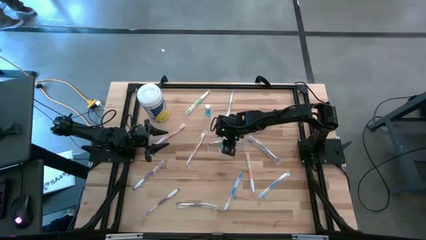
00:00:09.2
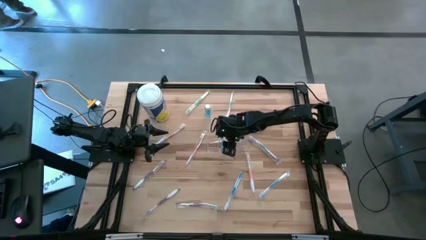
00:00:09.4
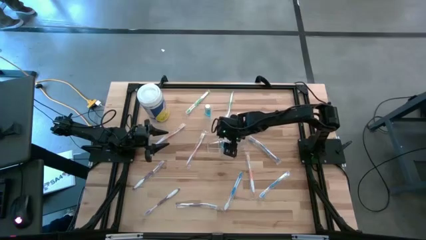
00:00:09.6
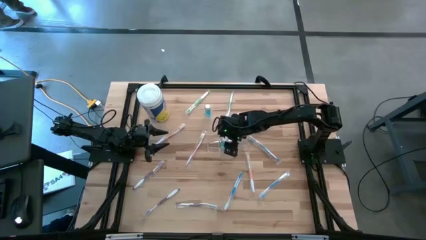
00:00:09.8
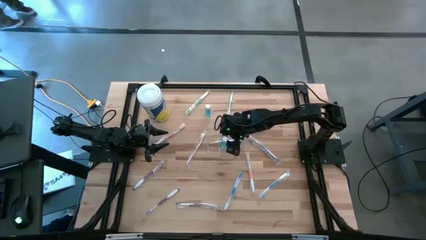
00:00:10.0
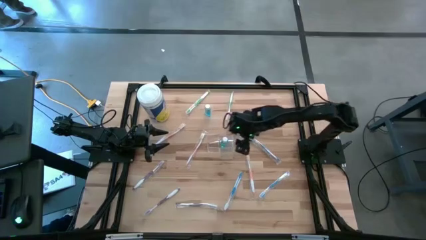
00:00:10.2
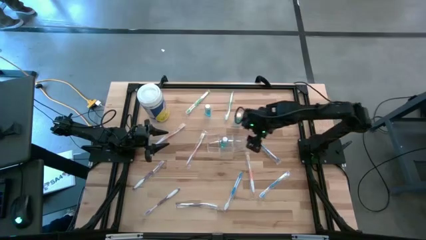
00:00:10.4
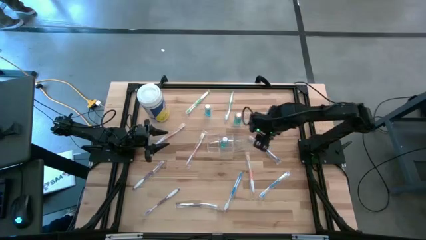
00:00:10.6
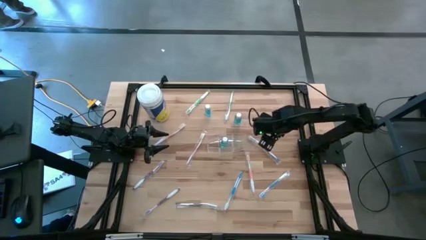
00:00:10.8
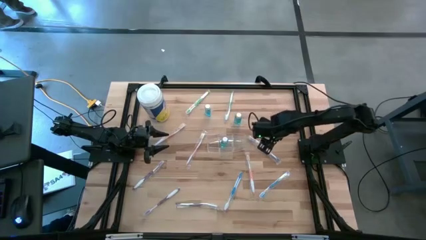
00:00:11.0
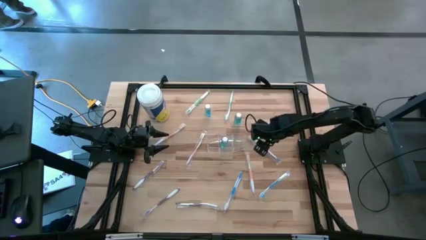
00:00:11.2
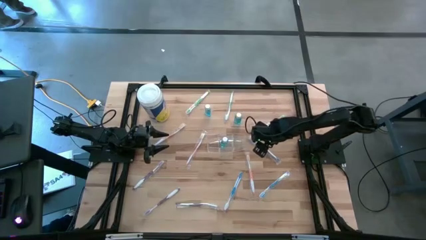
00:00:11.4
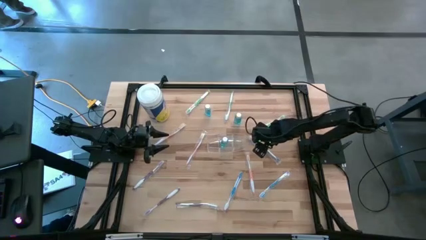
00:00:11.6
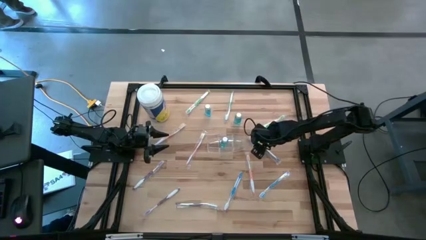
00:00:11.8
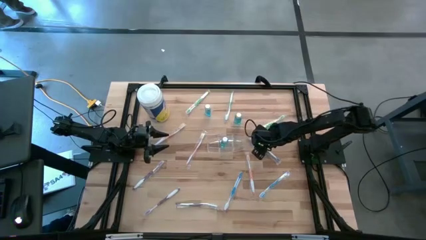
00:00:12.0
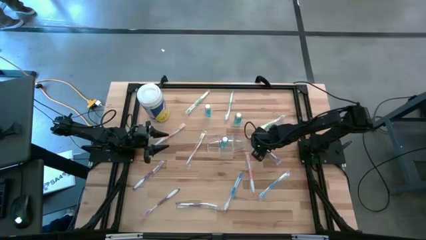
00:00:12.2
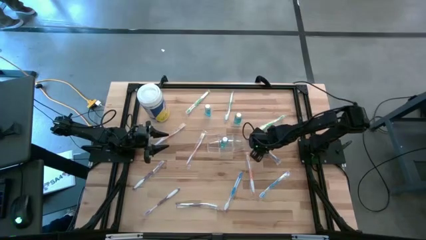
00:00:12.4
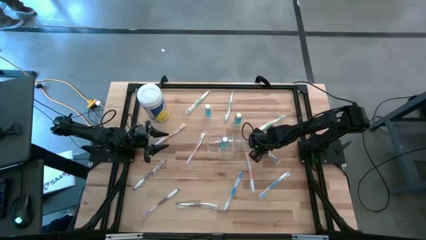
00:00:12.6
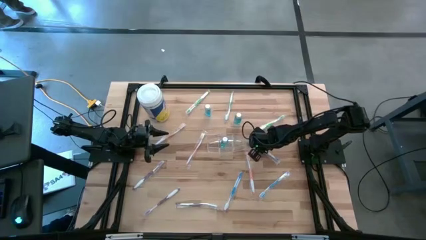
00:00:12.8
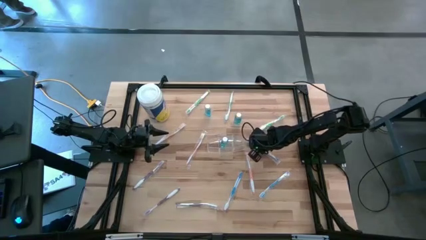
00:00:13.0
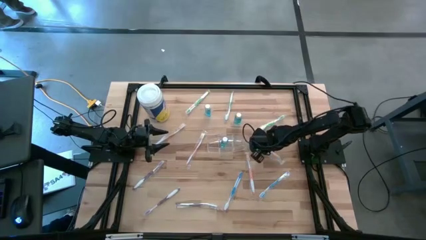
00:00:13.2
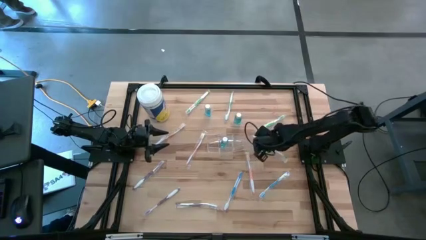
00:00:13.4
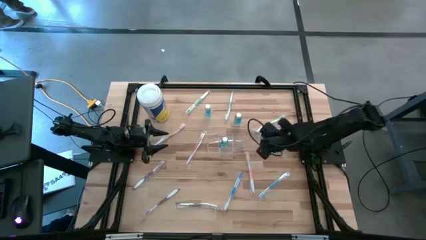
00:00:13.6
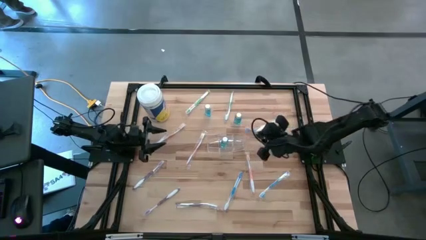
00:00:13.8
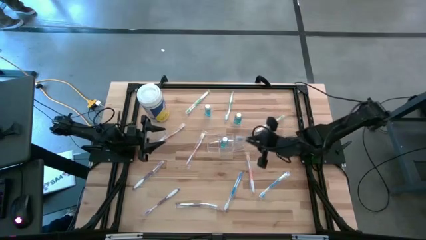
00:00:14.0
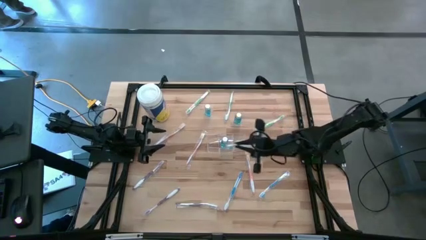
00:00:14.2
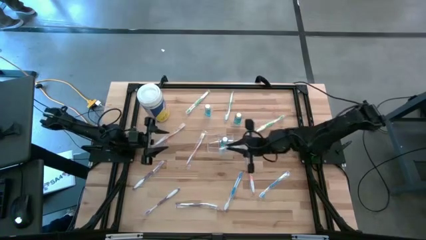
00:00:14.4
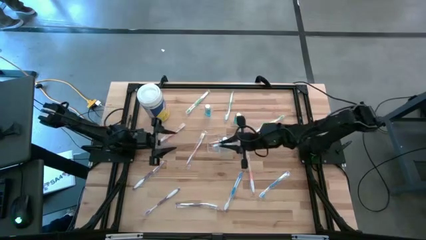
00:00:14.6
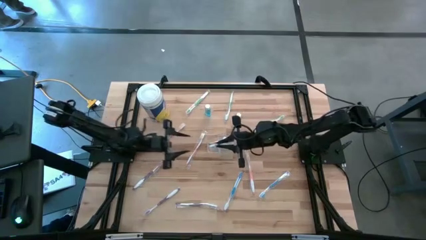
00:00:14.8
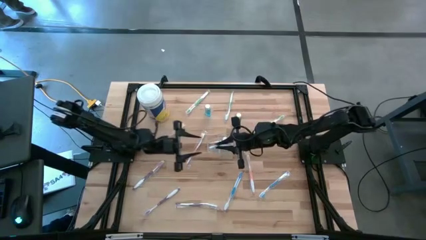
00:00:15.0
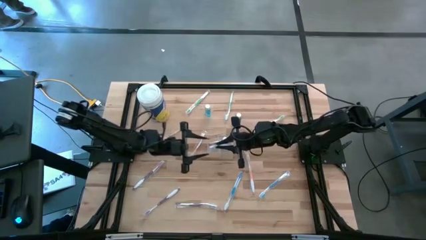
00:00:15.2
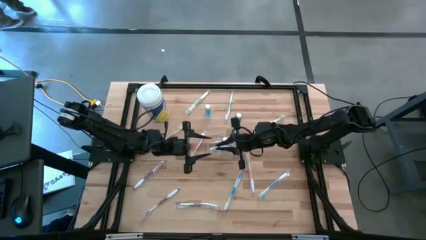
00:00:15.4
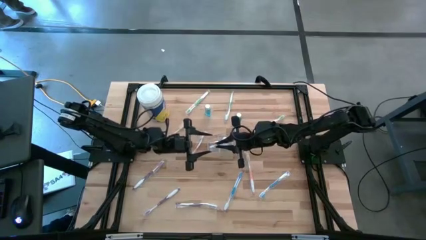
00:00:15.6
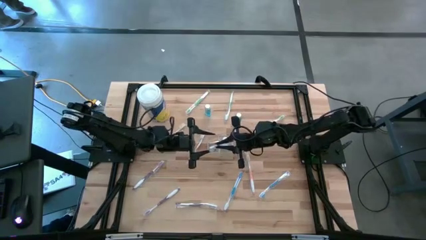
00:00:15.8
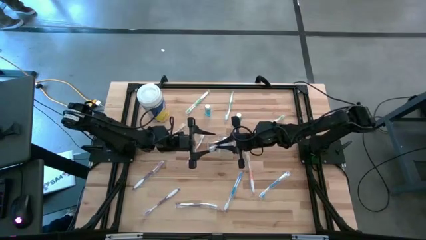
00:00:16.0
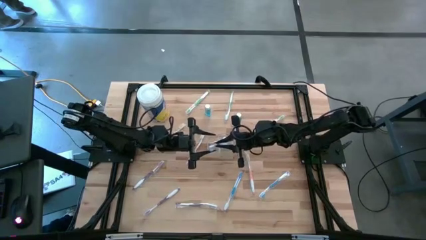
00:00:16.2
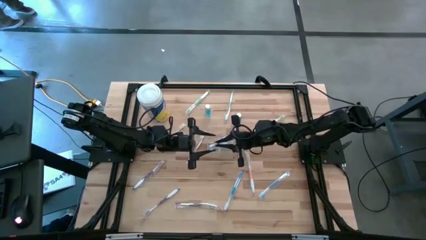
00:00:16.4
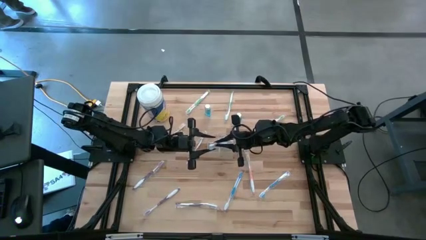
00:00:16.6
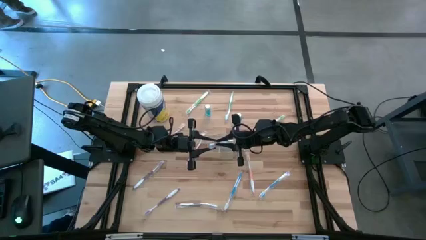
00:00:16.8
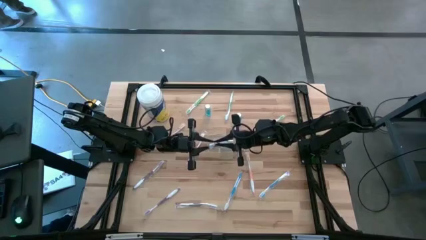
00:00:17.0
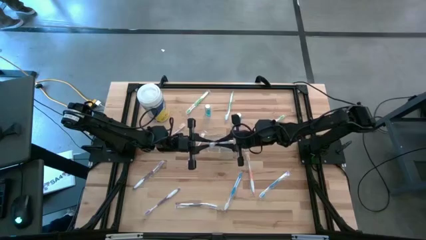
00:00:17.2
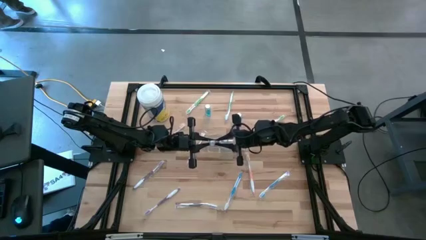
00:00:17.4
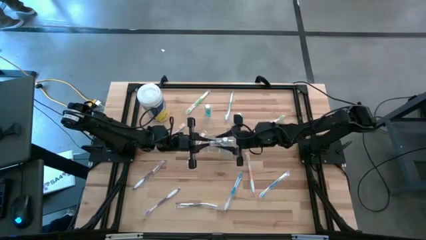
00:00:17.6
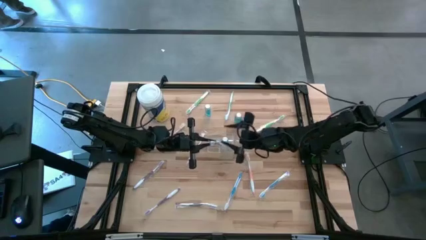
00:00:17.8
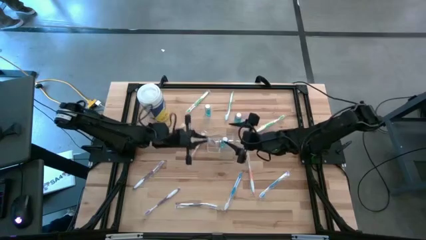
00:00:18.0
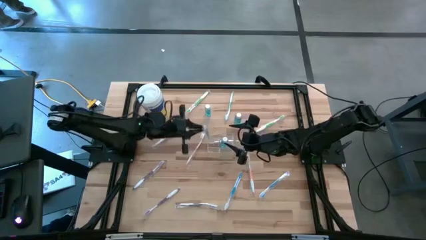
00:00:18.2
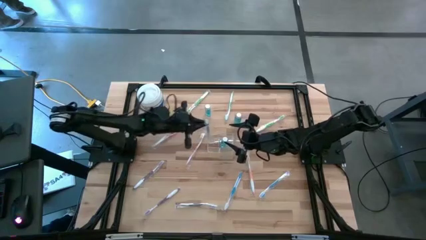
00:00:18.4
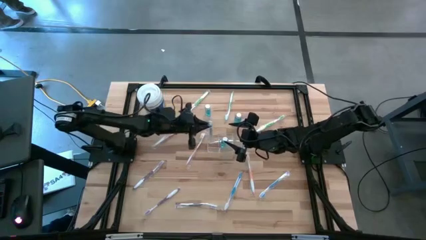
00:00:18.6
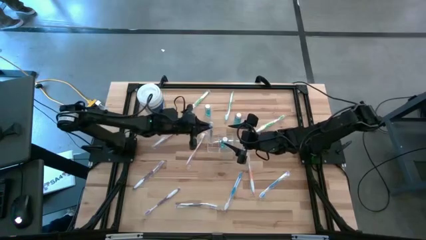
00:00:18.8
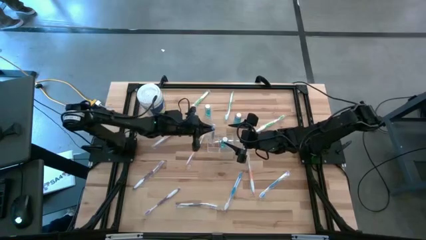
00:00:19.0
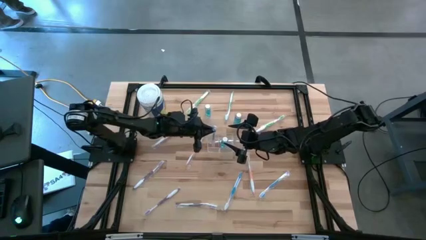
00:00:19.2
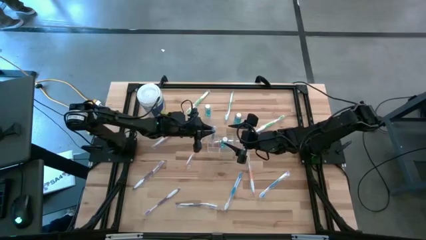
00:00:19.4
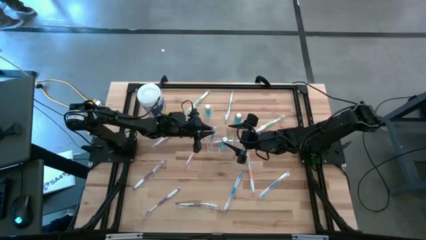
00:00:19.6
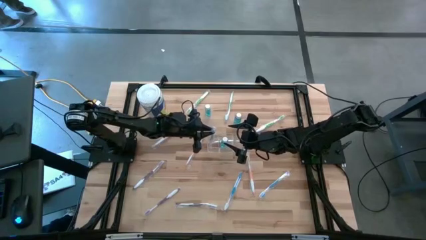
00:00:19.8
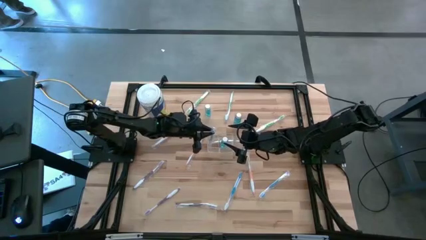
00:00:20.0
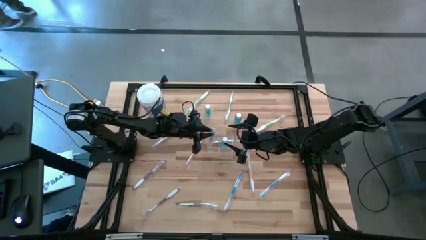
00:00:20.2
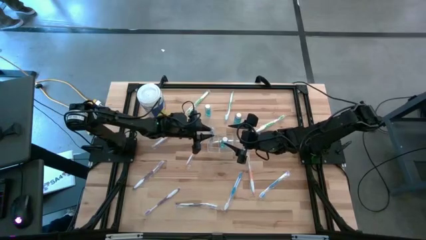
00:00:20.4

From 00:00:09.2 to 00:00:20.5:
Task: Pick & Place toothbrushing station
Put the top blue toothbrush into the left section of the transparent organizer
